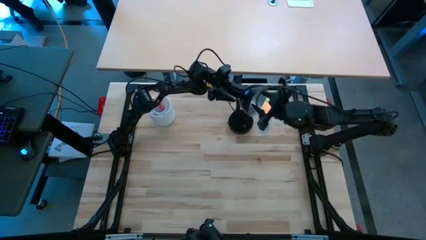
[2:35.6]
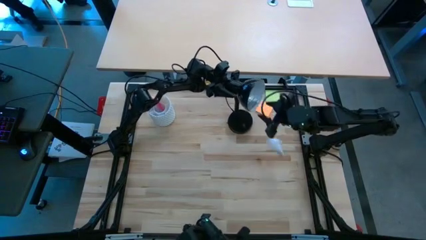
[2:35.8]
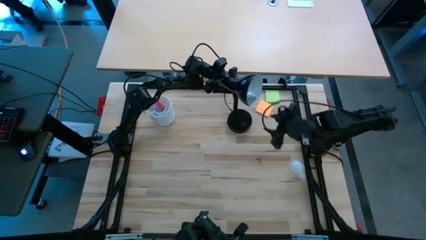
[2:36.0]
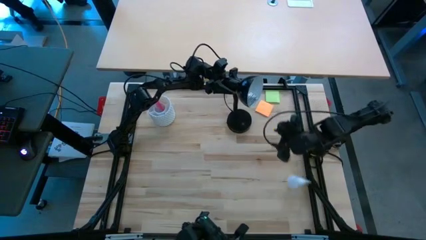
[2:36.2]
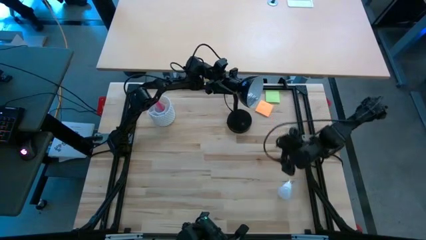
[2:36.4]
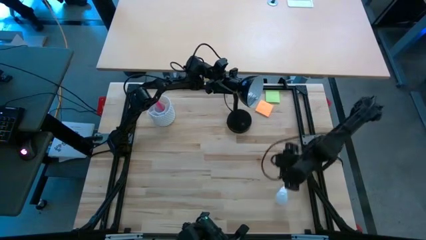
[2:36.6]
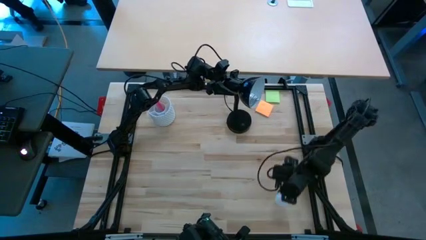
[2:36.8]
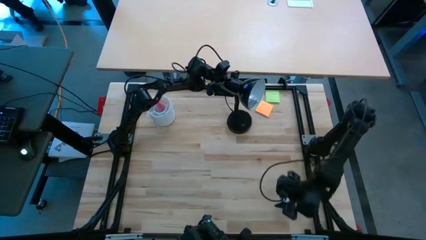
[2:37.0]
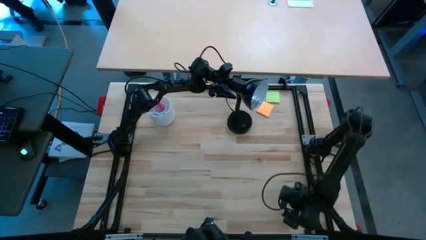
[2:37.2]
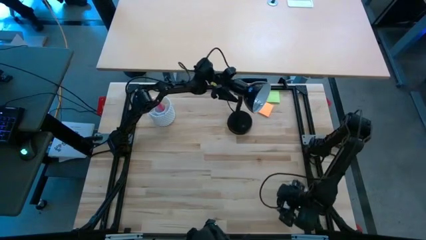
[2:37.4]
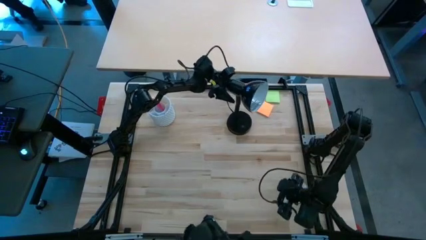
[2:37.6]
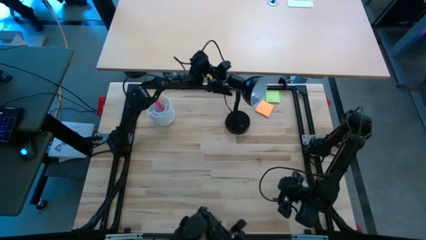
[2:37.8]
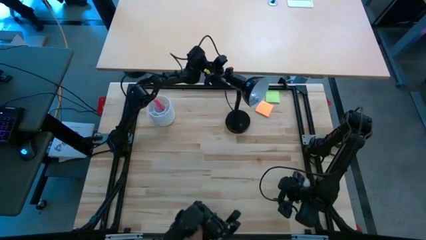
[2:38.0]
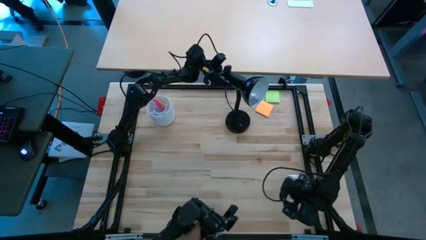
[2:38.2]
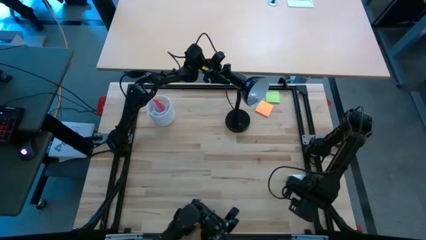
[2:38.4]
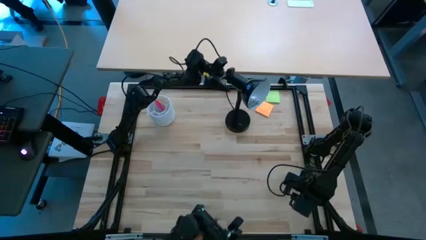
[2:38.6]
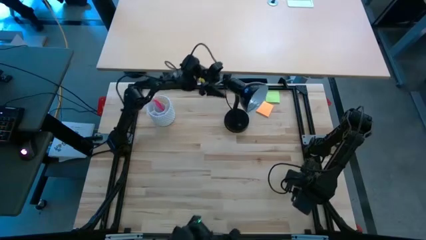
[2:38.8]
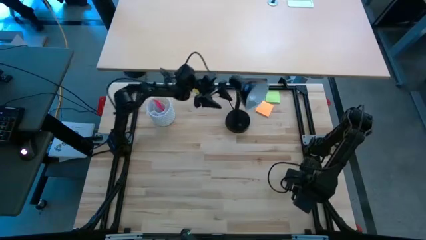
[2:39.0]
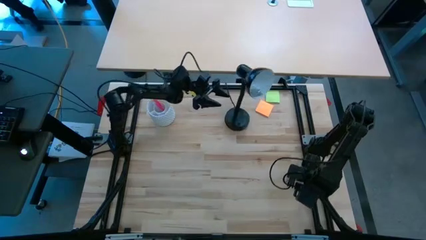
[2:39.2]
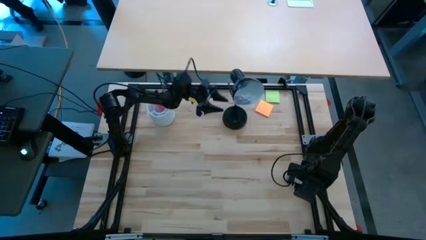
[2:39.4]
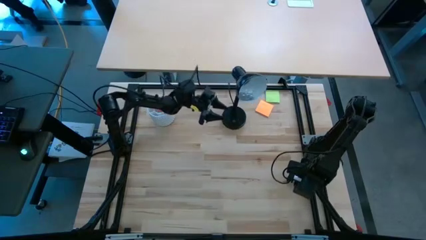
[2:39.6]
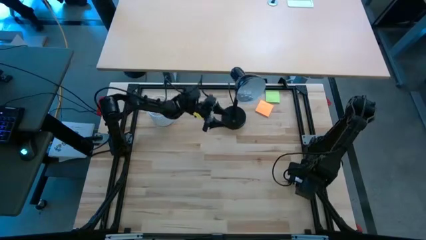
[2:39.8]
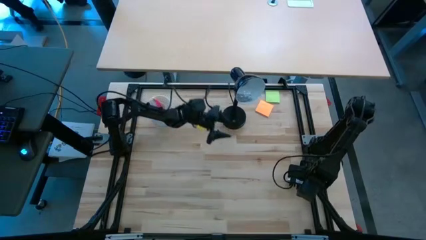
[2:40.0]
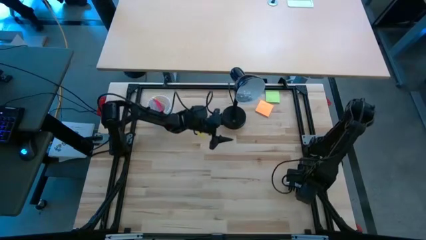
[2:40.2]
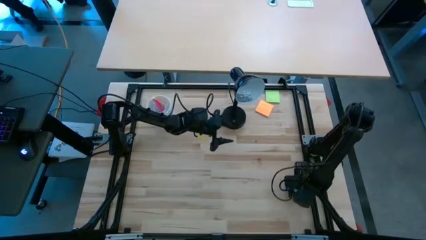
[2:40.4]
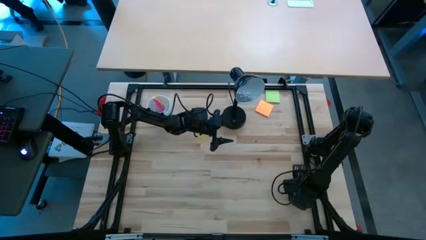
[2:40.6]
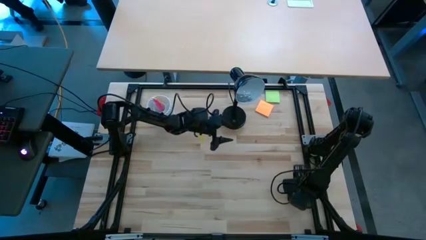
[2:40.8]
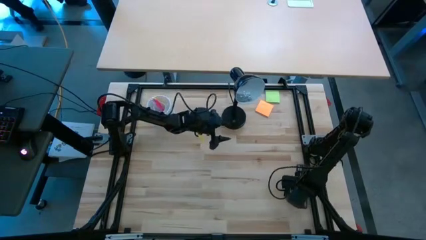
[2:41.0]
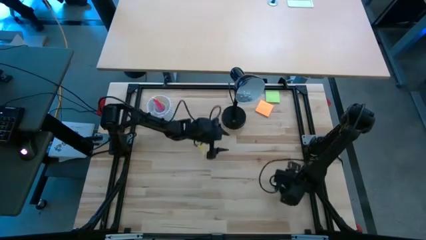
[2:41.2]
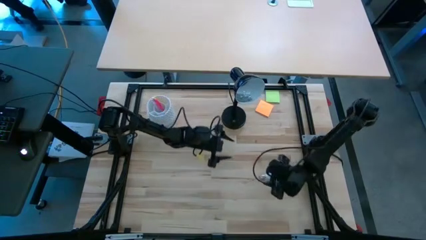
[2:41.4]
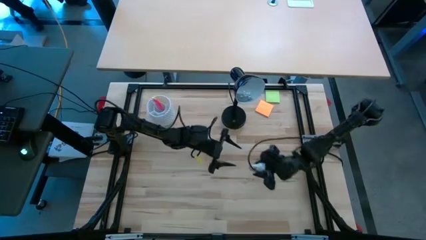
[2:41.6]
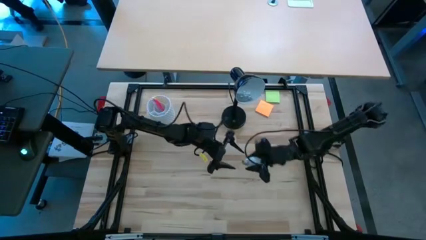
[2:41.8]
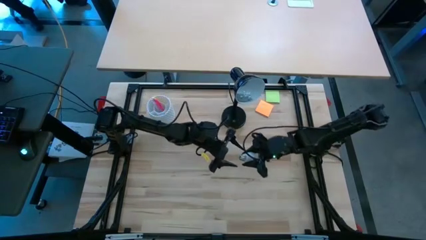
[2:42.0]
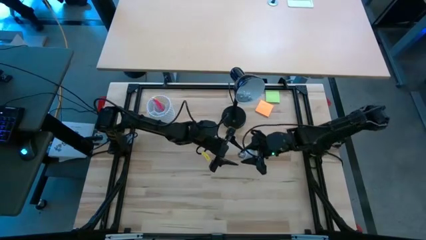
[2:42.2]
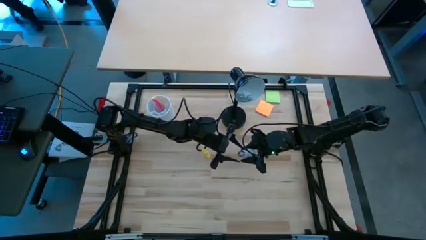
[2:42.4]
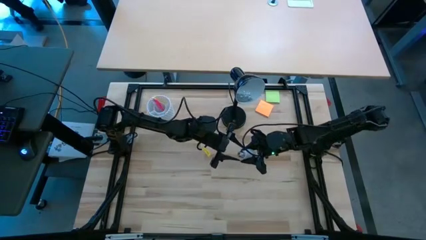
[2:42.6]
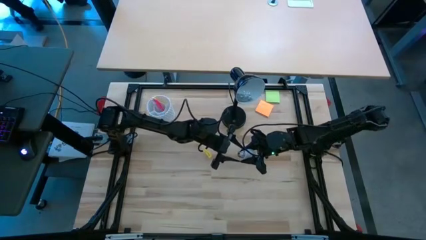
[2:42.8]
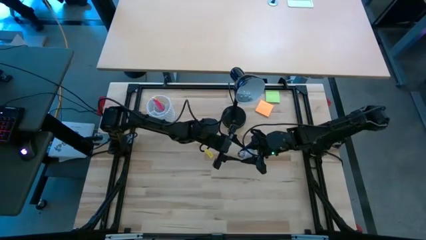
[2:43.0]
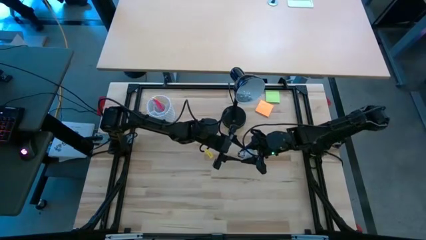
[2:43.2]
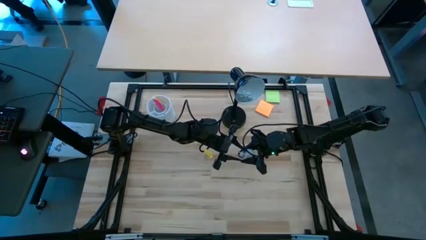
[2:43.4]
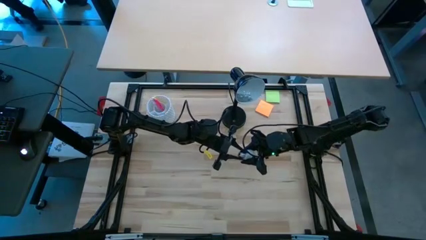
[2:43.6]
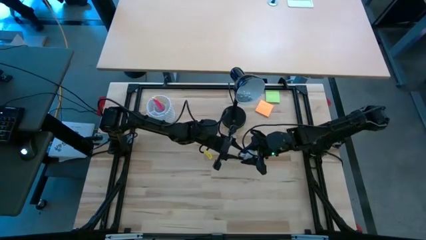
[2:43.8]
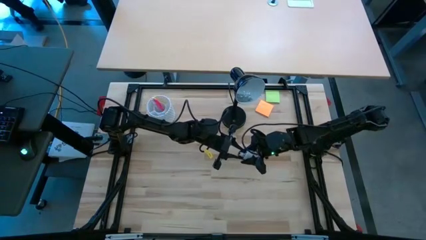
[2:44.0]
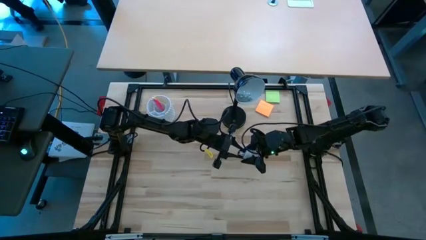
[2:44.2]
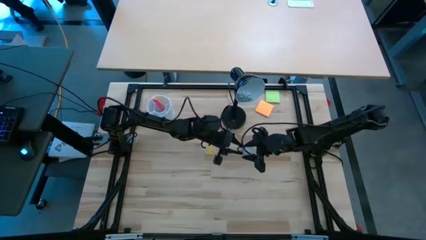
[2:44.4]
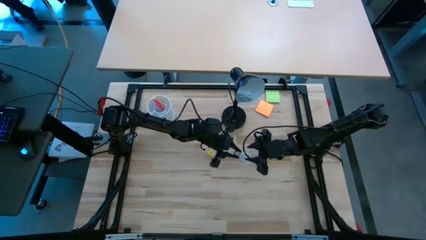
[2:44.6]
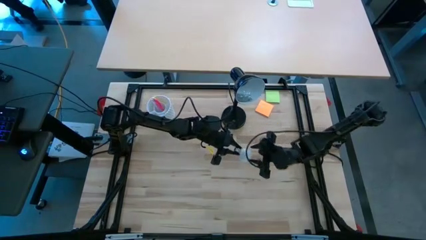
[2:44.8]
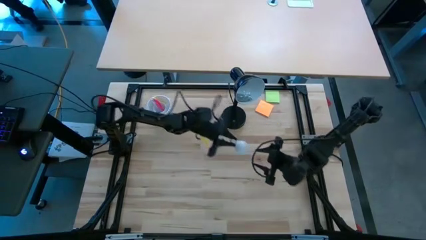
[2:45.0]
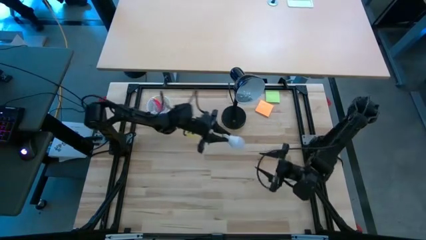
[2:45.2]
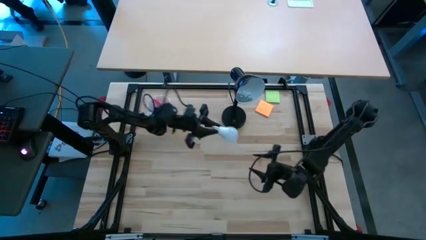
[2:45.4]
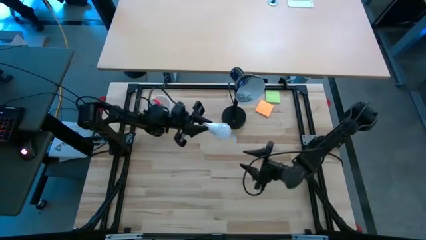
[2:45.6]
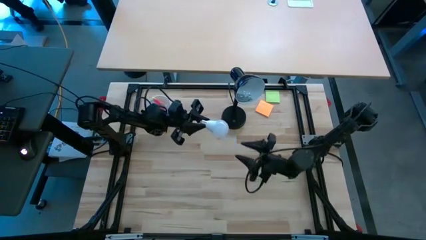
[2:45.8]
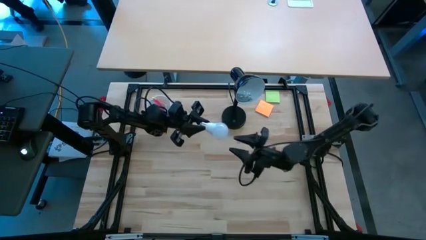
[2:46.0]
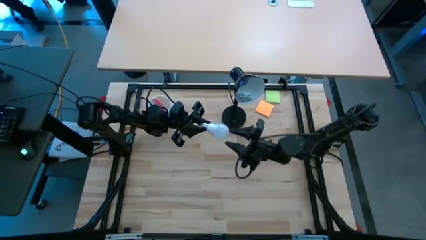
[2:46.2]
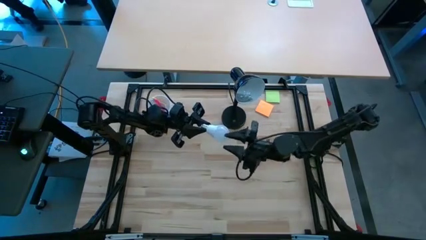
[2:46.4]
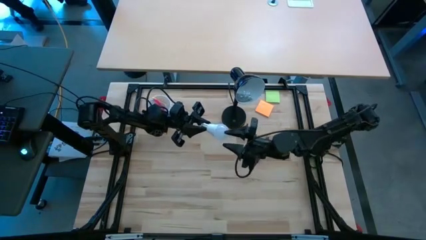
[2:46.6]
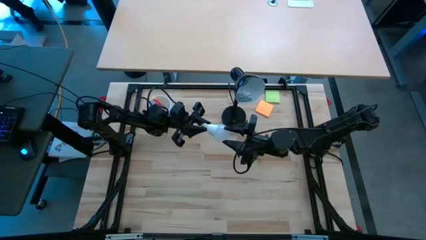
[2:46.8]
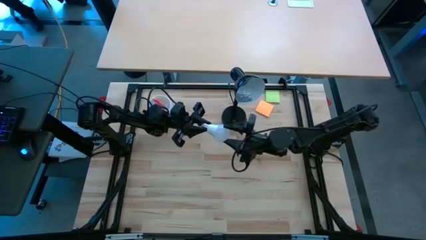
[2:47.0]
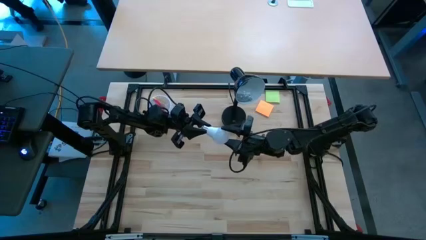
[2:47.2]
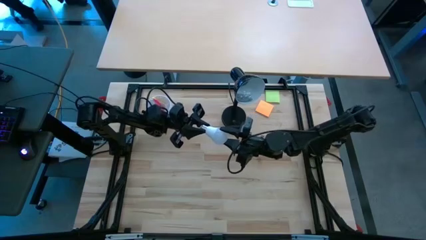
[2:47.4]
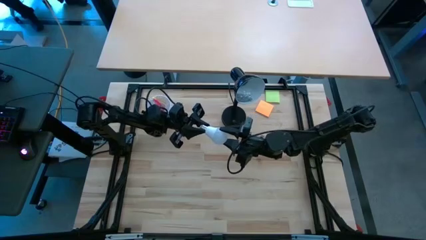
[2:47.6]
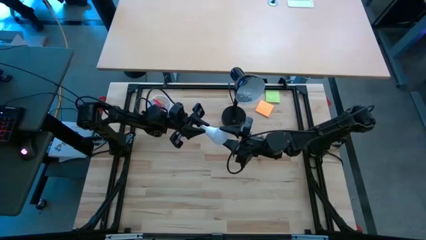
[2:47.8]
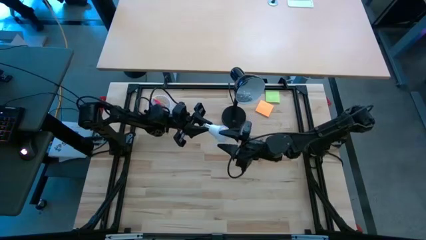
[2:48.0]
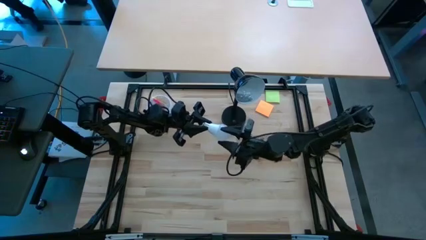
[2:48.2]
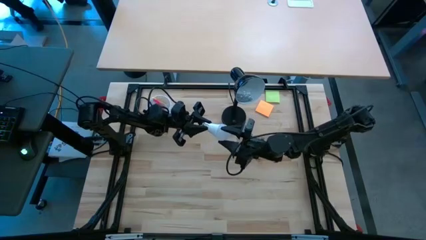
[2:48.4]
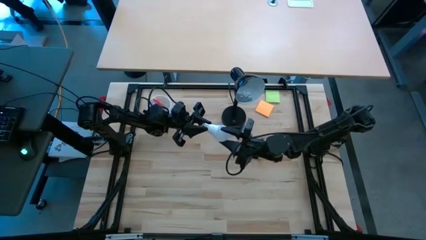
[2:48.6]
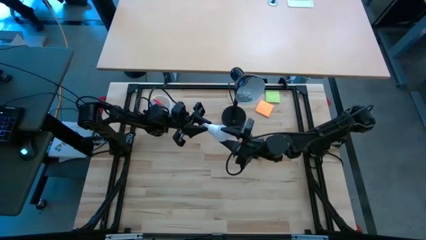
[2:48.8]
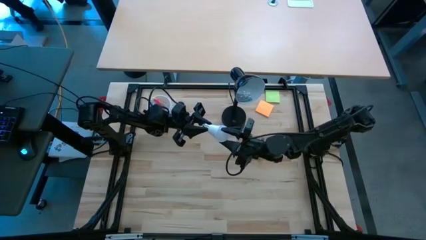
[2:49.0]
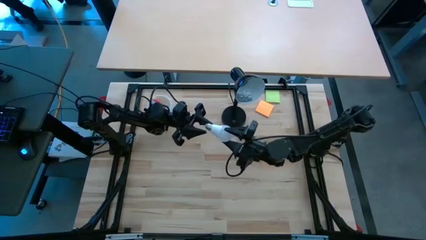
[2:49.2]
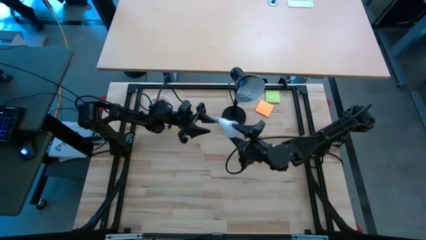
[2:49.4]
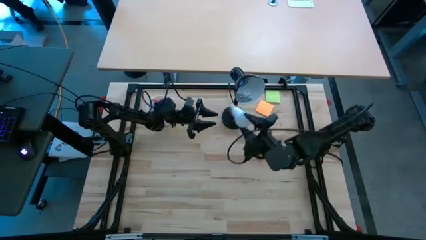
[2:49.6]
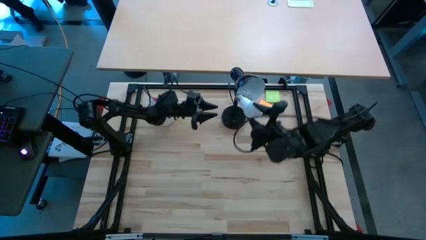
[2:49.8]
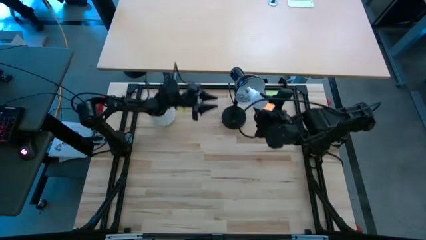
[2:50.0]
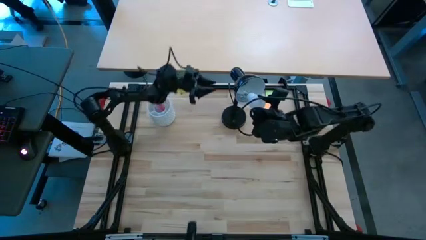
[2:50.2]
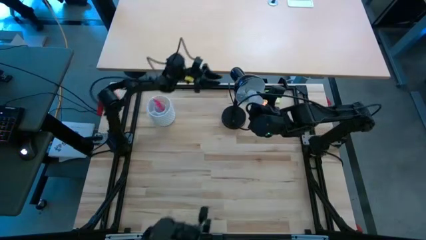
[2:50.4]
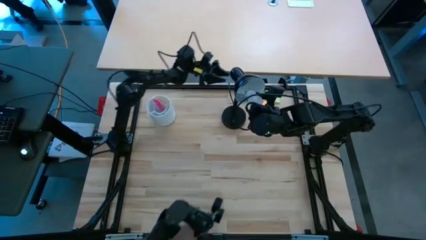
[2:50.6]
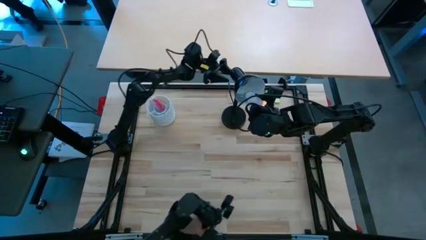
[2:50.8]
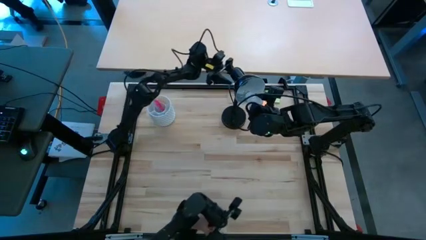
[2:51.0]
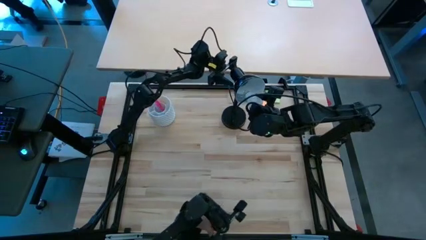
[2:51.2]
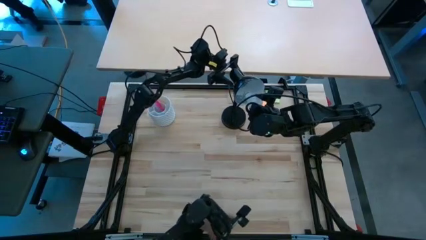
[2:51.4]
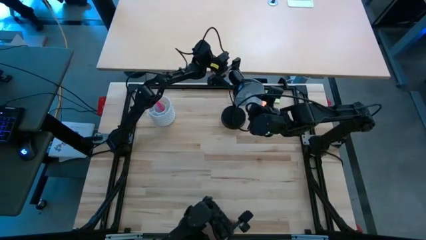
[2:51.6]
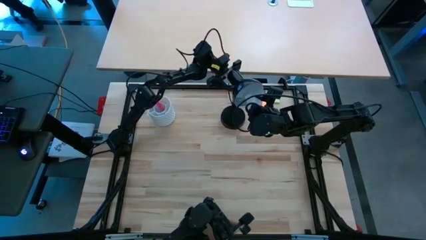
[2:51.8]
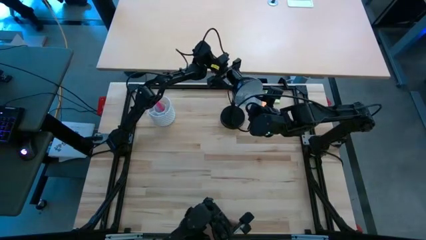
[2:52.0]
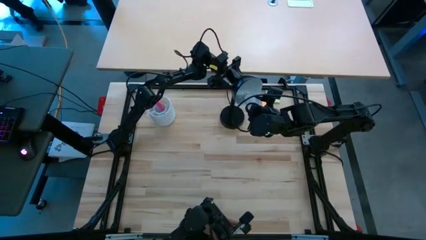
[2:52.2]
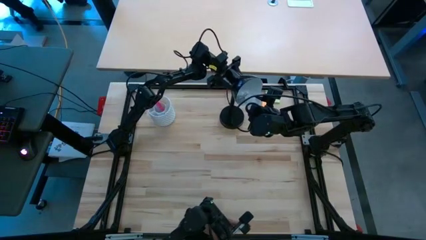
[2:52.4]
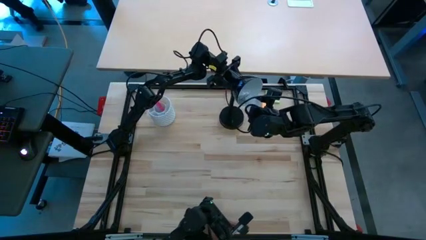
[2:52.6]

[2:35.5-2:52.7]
Task: Screw lightbulb
Insert the light bulb into the desk lamp
